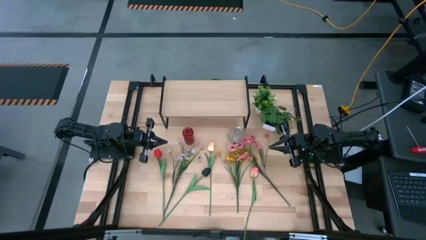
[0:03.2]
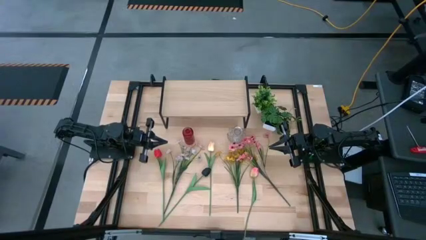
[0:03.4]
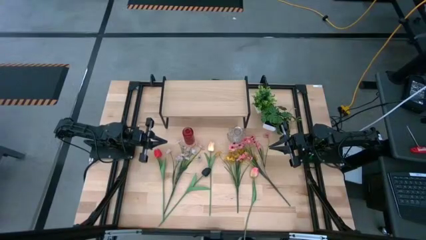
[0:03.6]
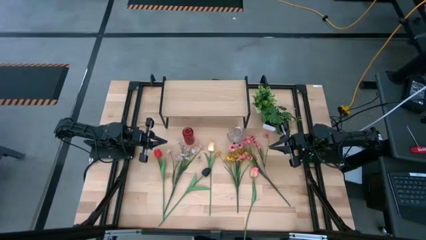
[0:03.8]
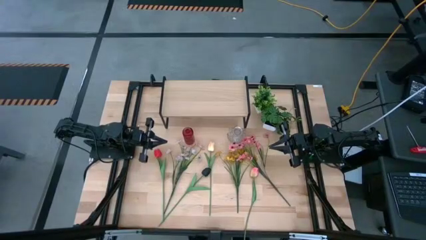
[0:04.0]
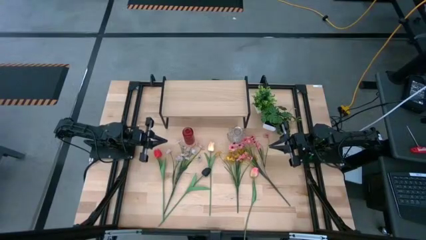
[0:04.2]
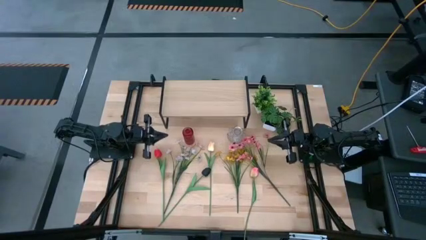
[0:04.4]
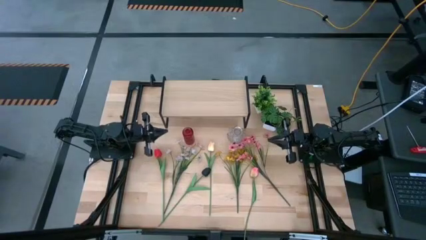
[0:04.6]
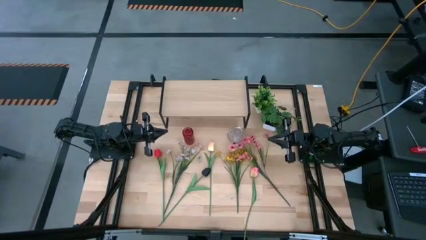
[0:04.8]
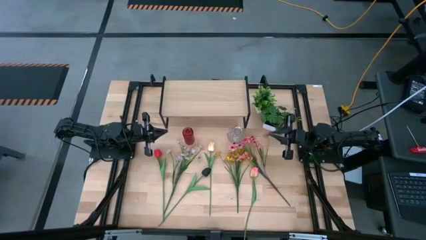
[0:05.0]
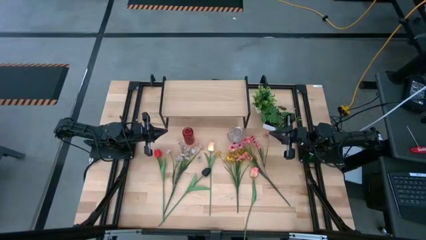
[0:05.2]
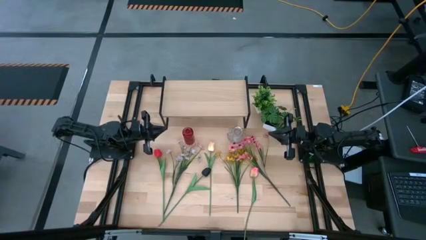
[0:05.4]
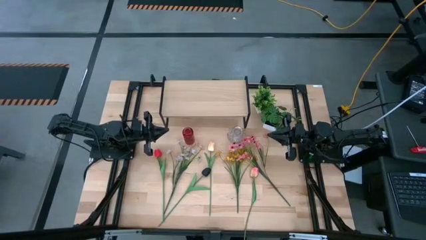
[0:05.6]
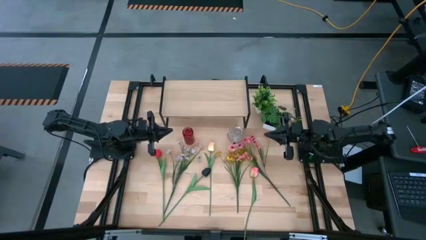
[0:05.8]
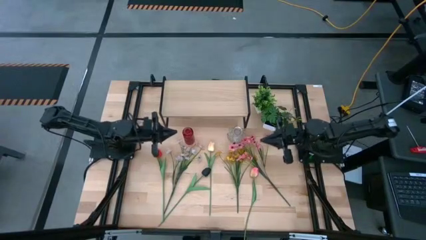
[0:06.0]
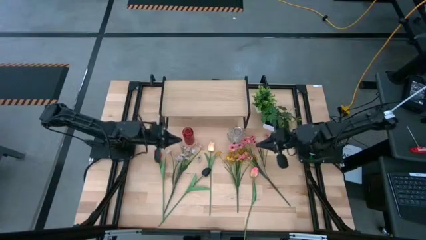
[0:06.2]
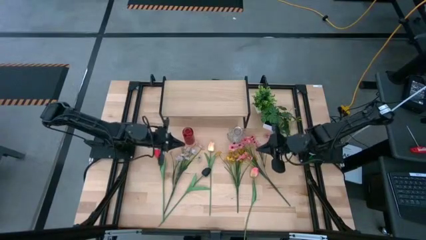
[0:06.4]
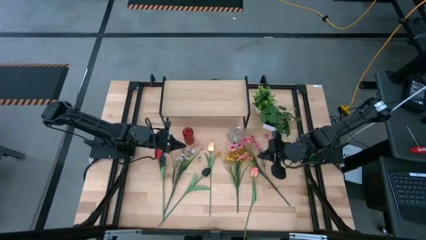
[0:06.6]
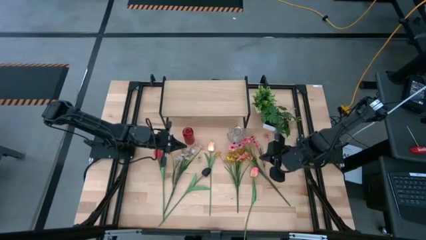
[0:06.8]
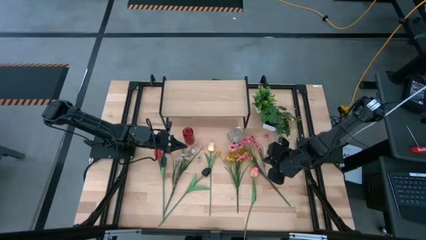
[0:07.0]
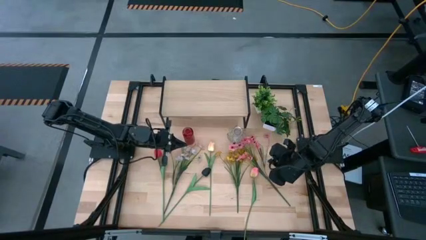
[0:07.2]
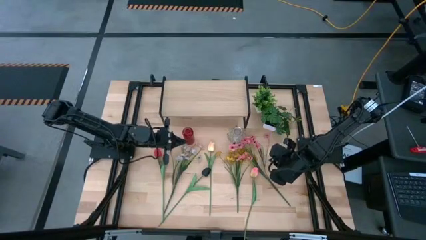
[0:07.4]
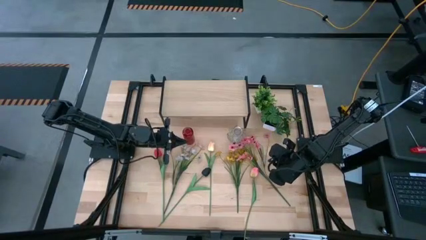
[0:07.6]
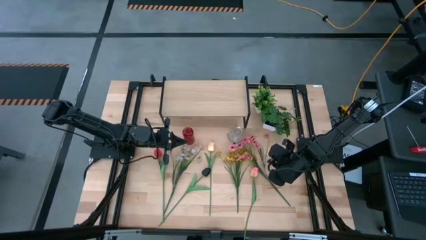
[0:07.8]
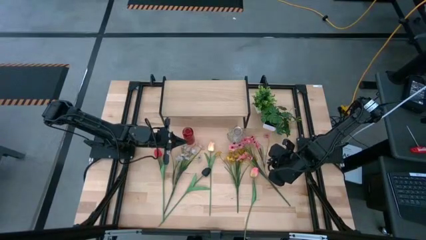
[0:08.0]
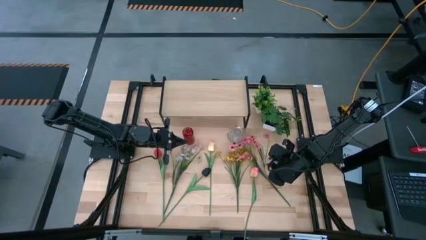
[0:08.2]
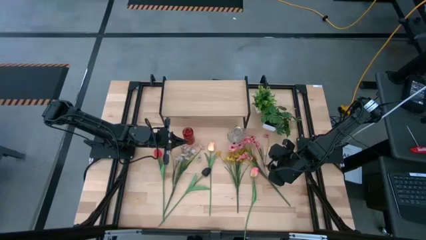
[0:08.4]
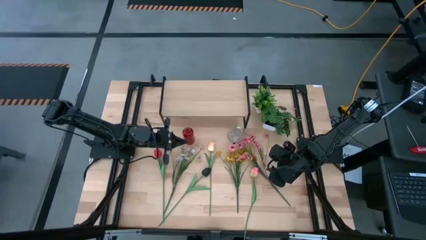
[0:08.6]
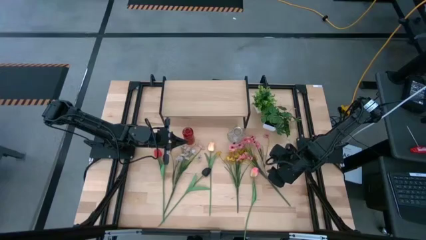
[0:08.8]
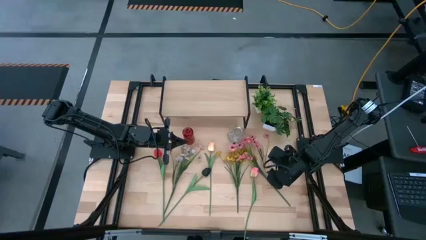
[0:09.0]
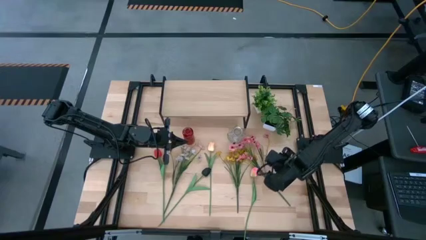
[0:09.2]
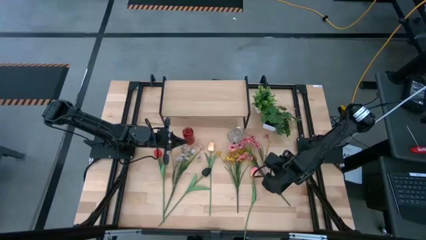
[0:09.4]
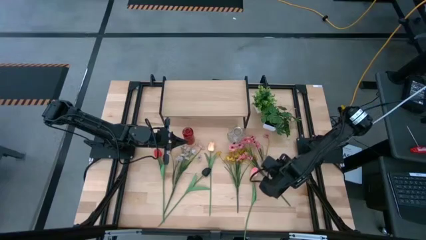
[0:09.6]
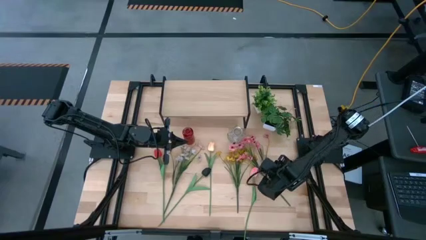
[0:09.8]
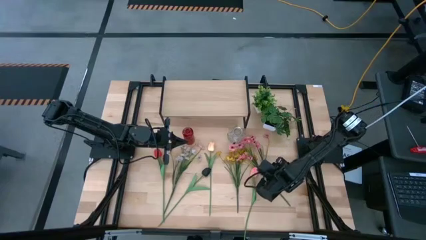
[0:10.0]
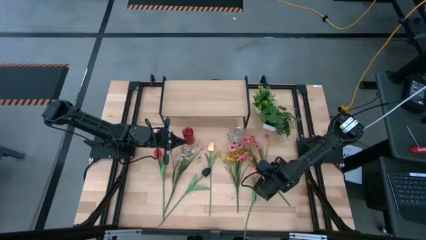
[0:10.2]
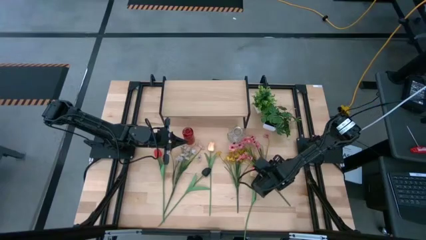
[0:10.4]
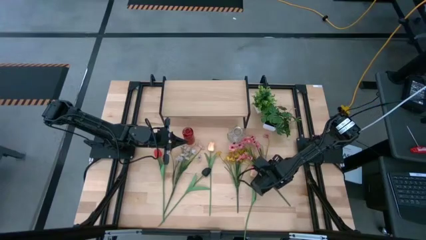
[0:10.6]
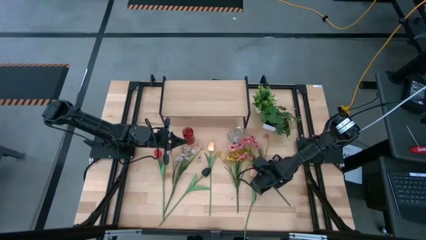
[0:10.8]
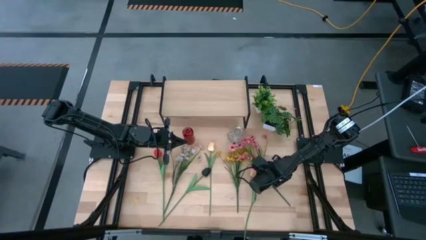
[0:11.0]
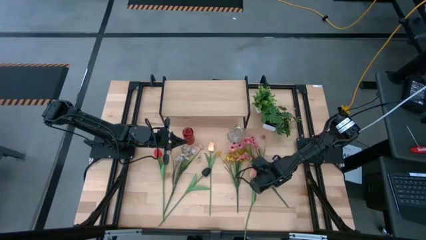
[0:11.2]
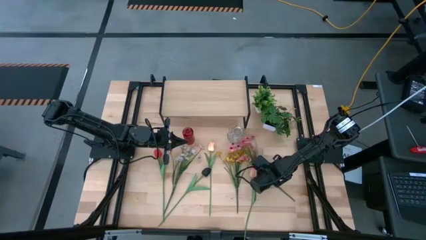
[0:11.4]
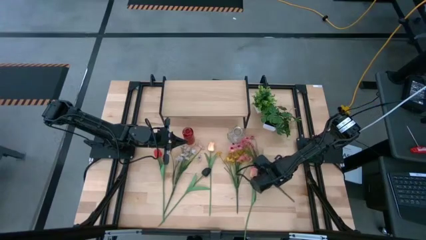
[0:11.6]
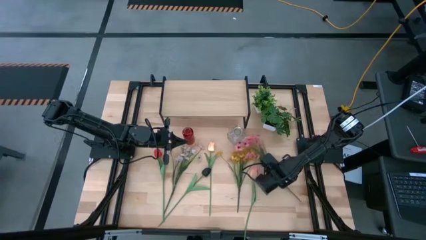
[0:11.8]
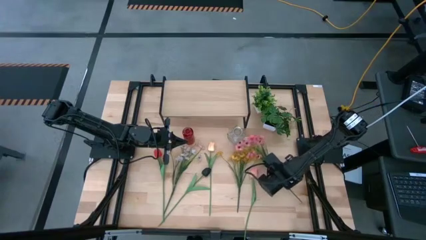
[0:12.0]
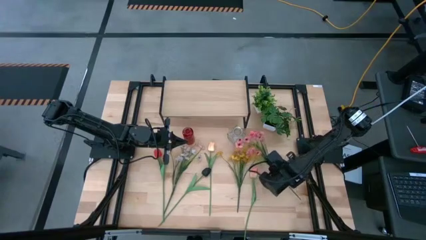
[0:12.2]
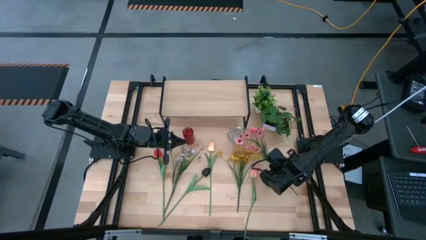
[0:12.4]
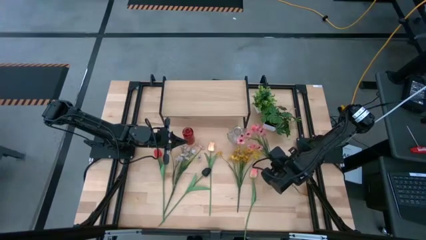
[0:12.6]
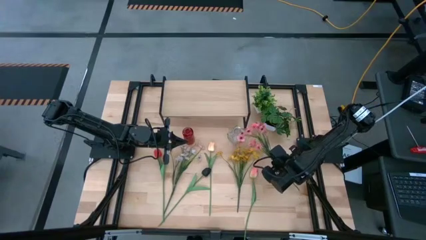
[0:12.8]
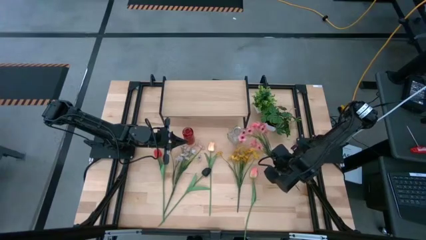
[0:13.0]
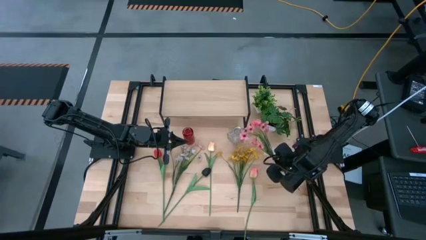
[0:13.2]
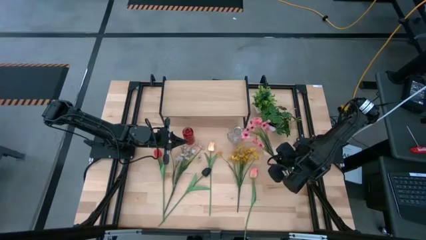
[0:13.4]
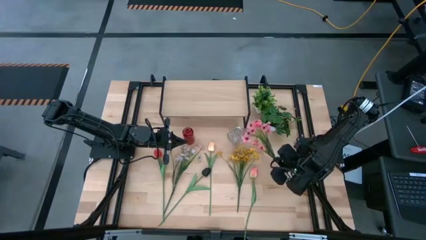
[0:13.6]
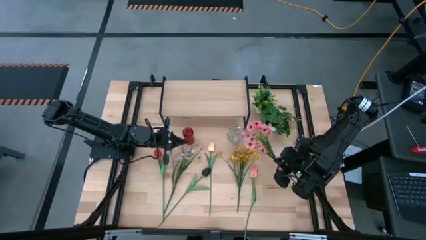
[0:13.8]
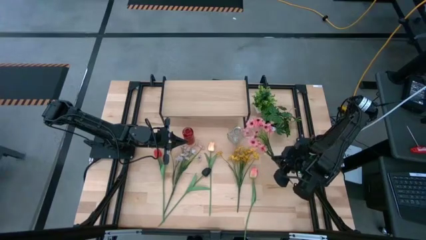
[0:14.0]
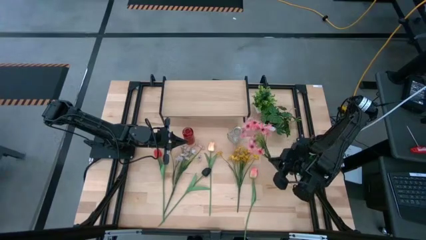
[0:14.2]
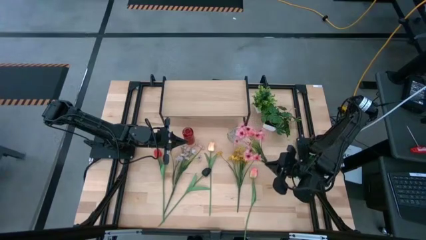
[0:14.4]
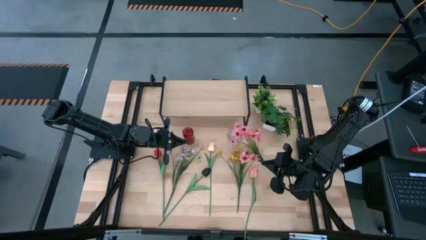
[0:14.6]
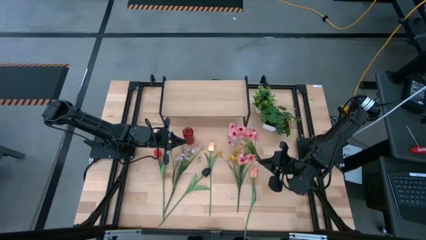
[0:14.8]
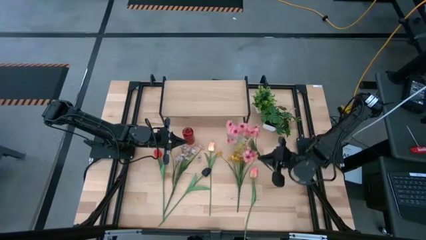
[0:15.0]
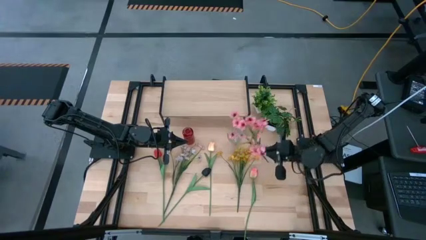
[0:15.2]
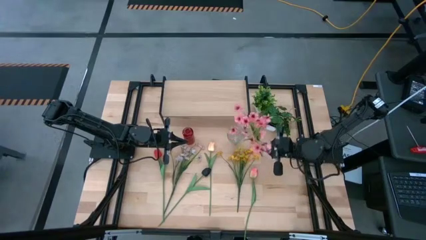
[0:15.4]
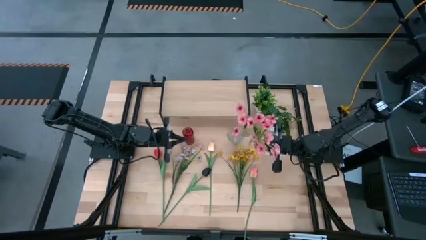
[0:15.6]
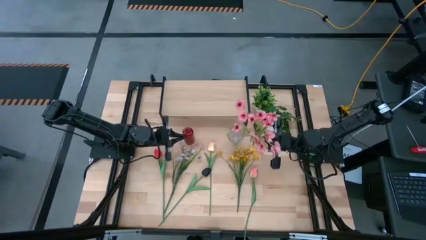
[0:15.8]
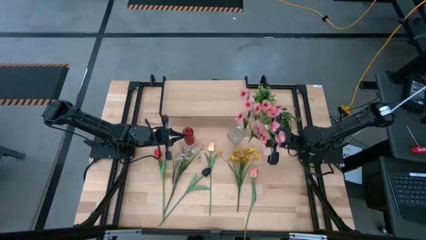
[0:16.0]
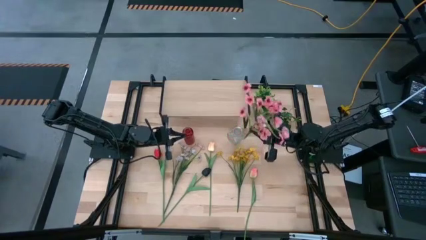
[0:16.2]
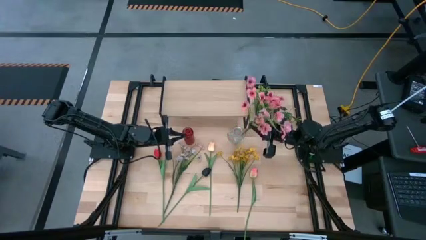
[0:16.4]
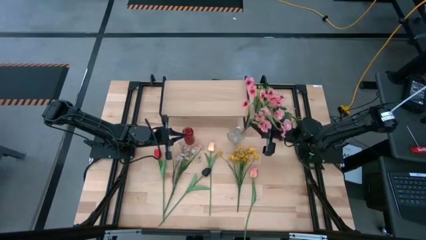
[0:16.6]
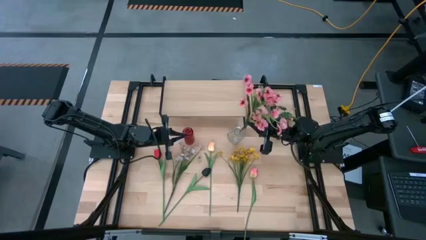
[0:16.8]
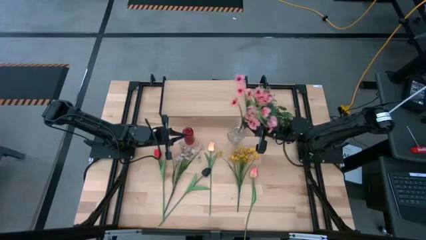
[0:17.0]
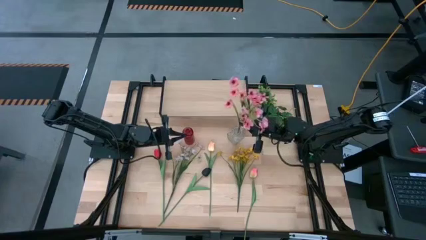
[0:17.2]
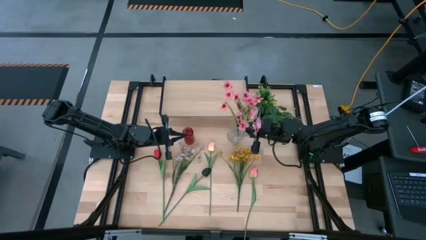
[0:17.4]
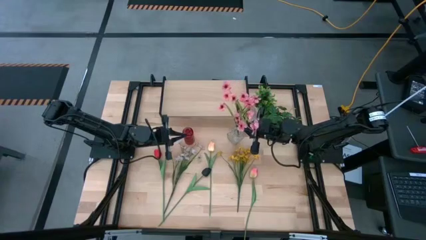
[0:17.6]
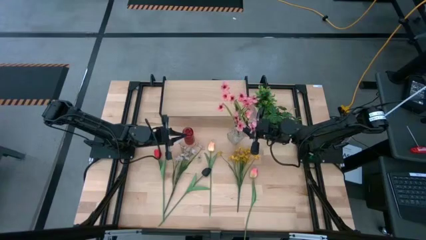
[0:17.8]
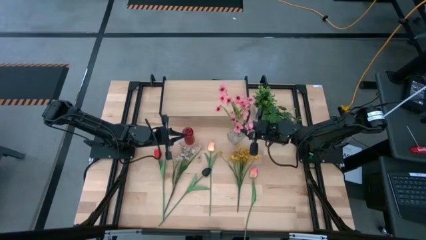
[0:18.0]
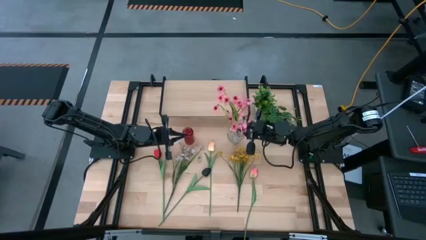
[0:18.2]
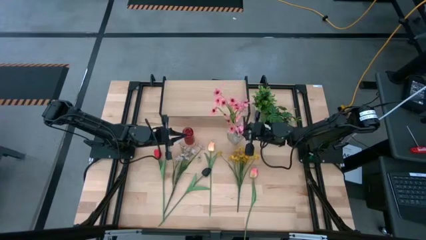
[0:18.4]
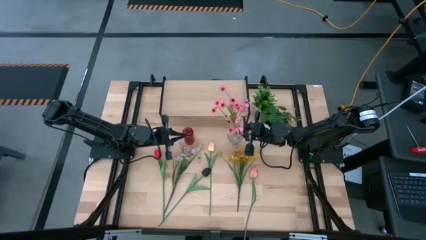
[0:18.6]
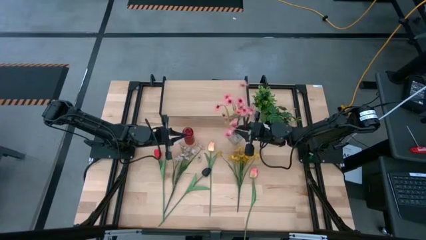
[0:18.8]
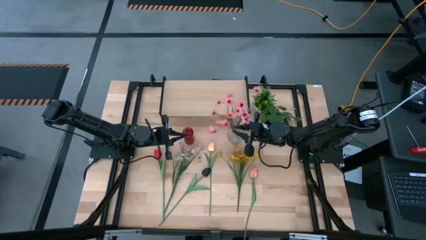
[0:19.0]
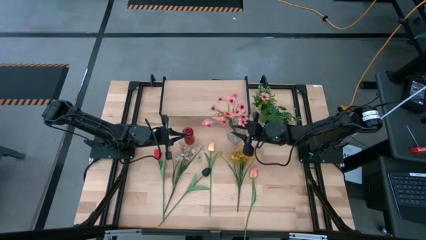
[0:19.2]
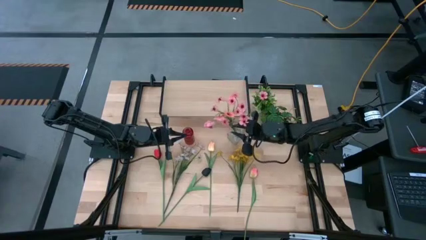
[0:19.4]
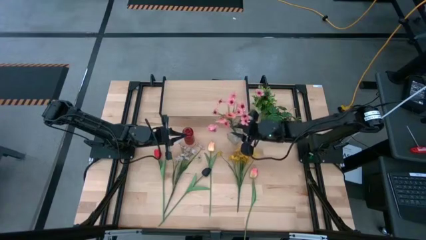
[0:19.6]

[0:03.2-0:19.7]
Task: Pick and place flowers into a vace then onto a shelf
Put the pink flowers into the transparent flower vase
